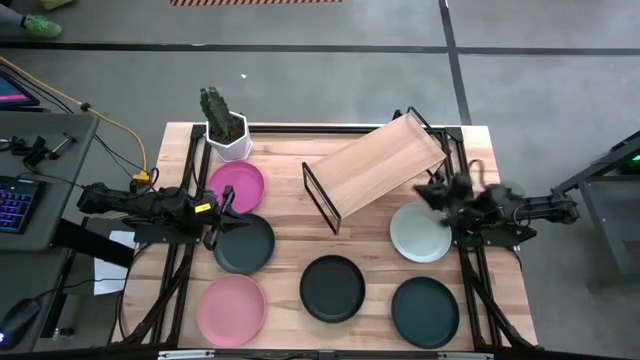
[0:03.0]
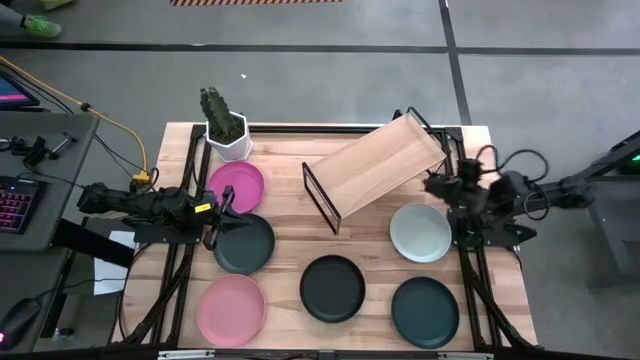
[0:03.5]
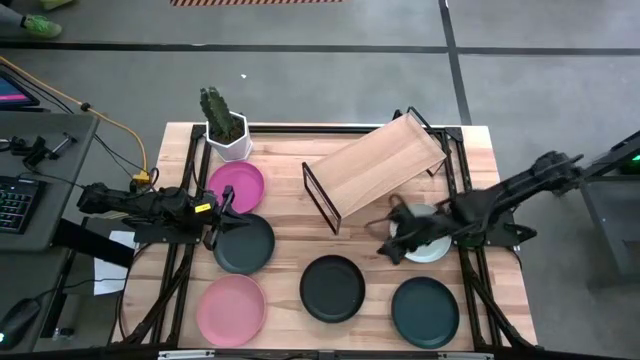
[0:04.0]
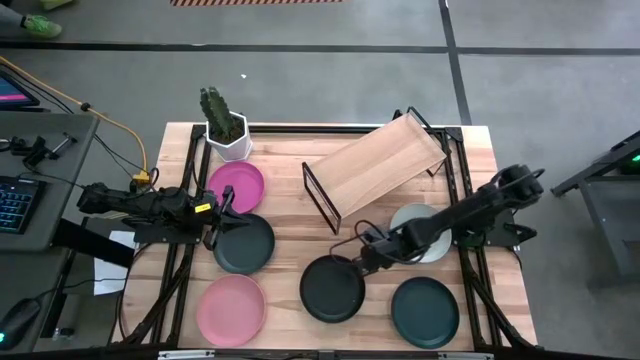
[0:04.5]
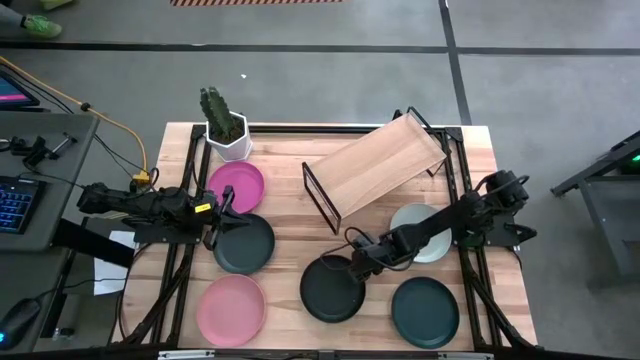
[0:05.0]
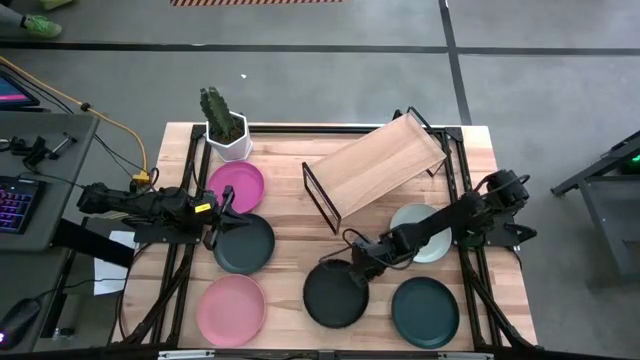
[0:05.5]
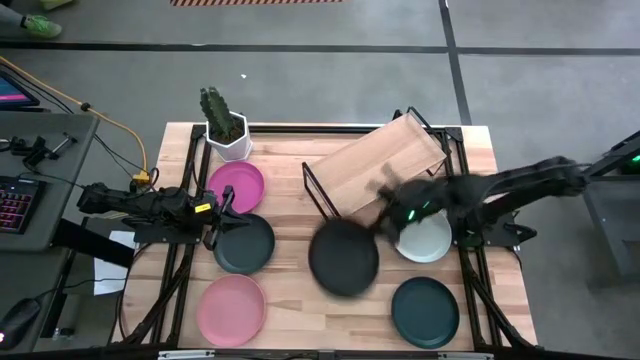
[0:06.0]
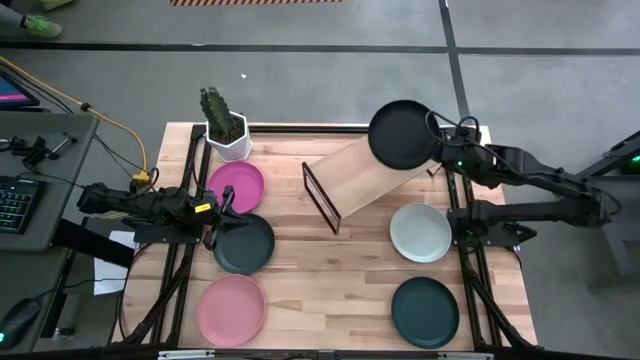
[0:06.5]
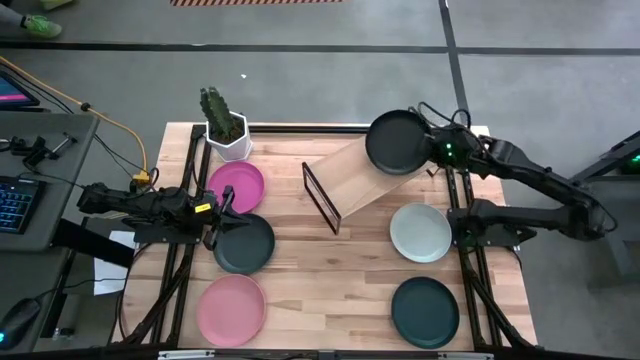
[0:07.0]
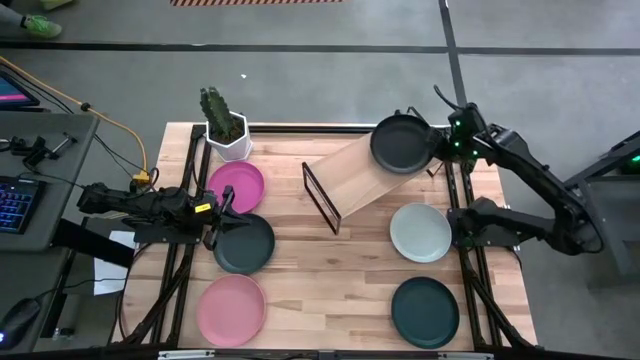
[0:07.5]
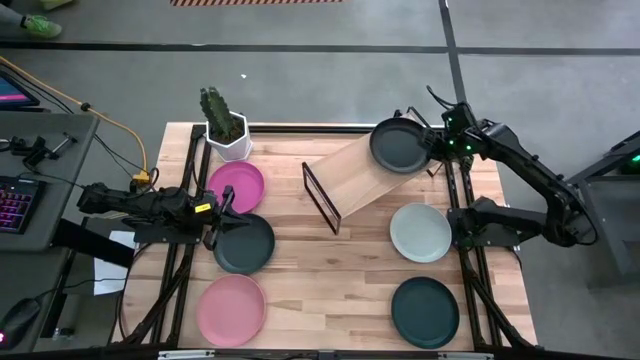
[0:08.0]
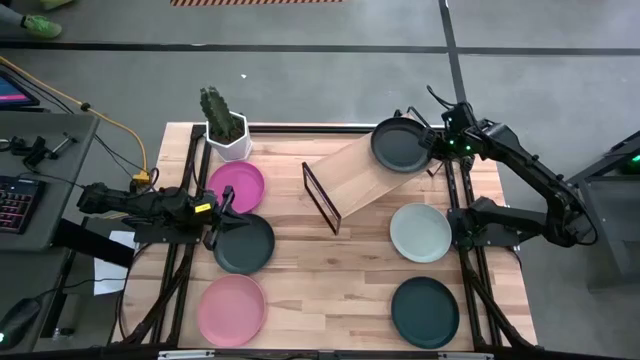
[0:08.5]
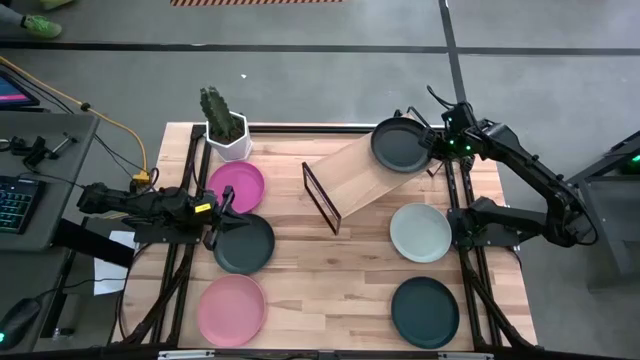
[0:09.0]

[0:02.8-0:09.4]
Task: Place and stack plates onto a shelf
Put the middle black plate on the shelf

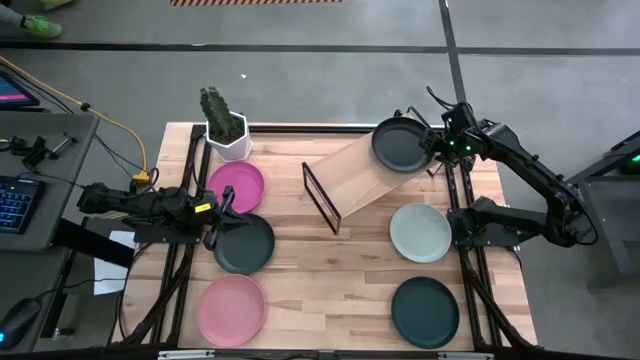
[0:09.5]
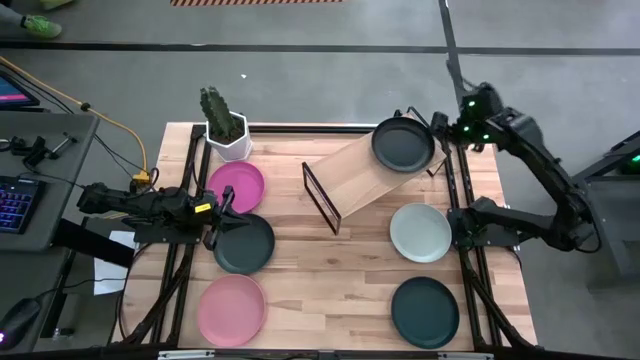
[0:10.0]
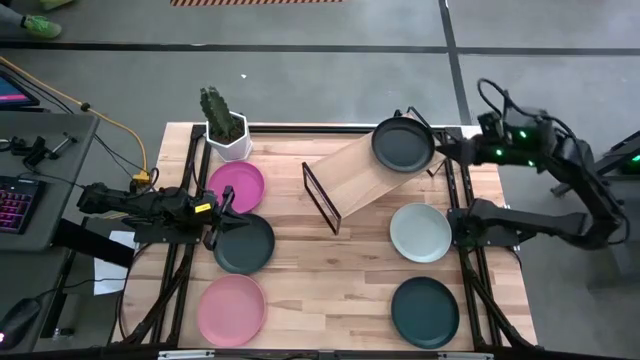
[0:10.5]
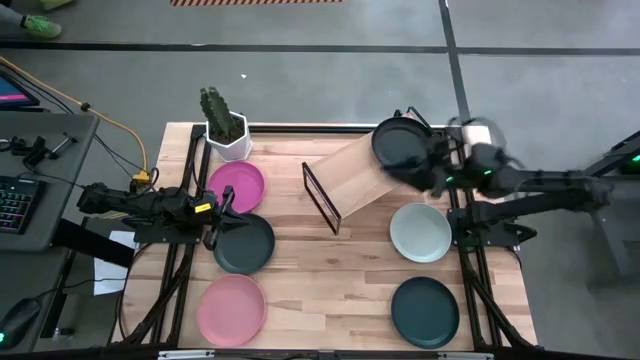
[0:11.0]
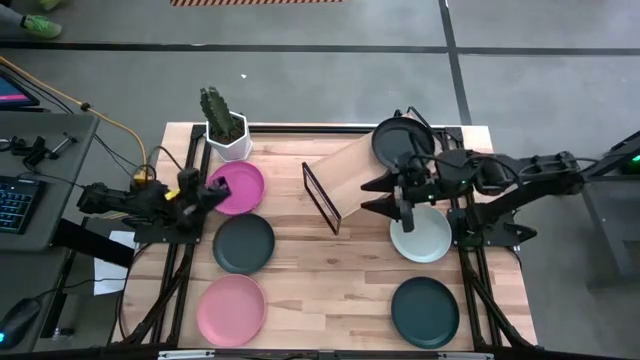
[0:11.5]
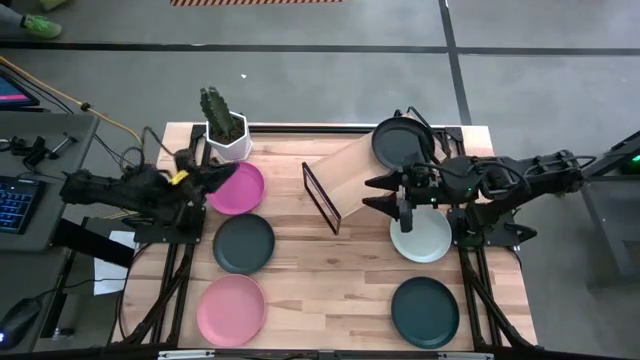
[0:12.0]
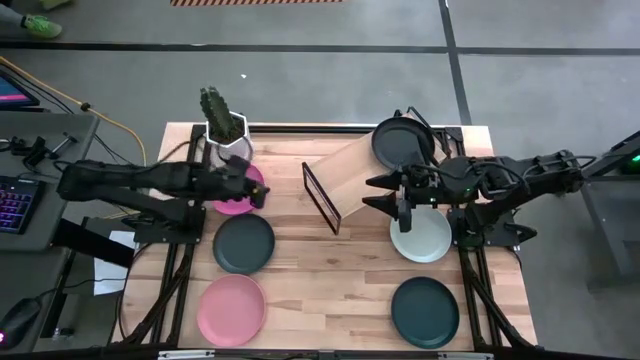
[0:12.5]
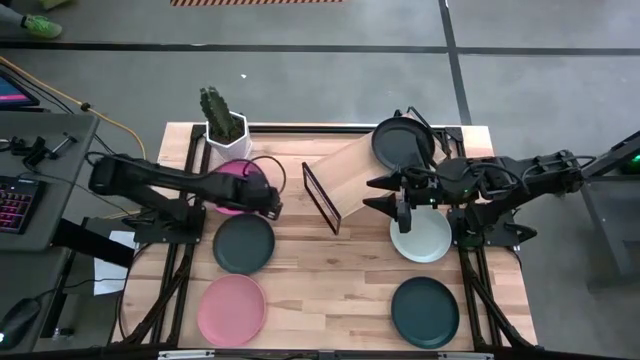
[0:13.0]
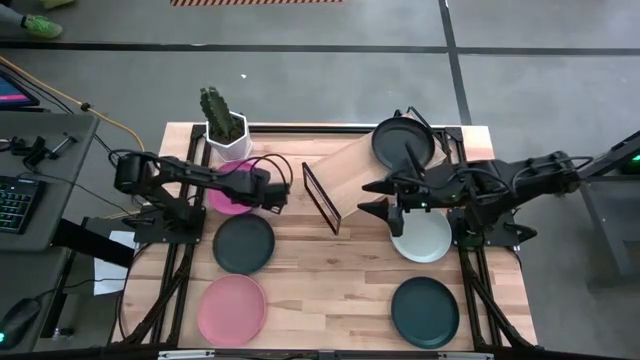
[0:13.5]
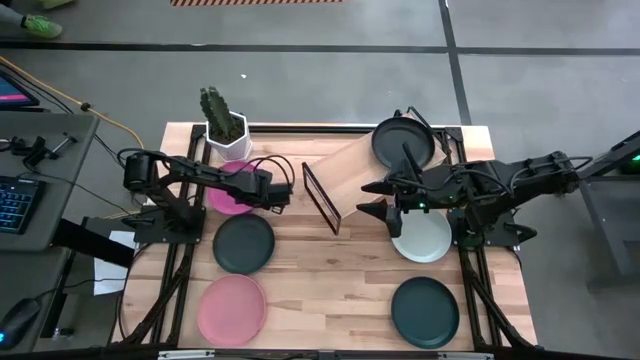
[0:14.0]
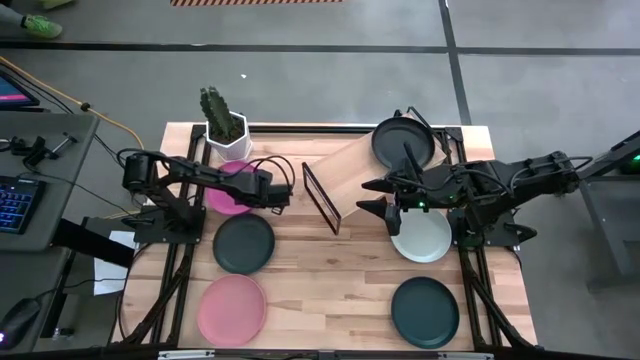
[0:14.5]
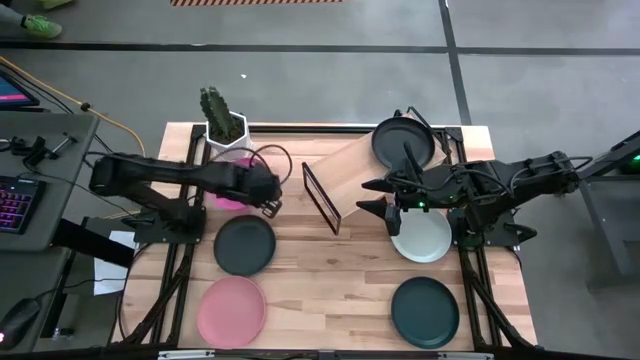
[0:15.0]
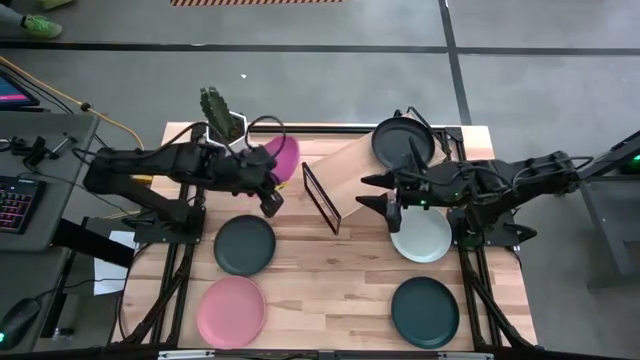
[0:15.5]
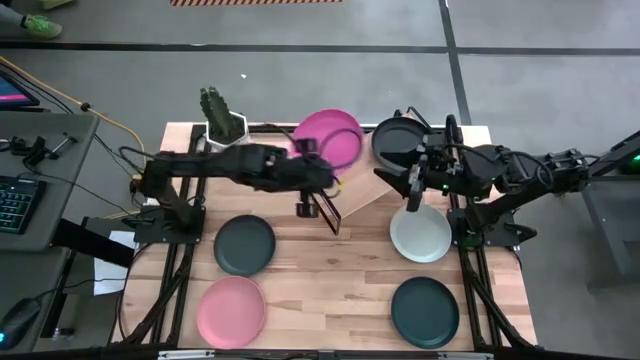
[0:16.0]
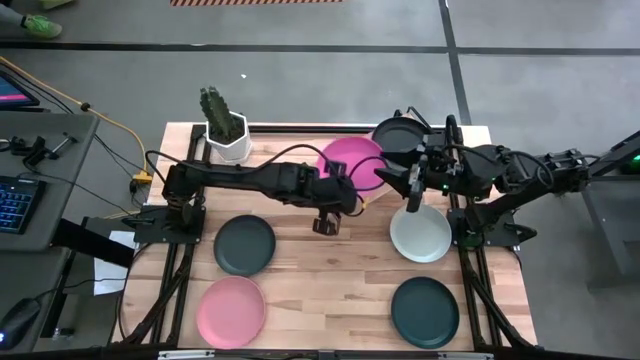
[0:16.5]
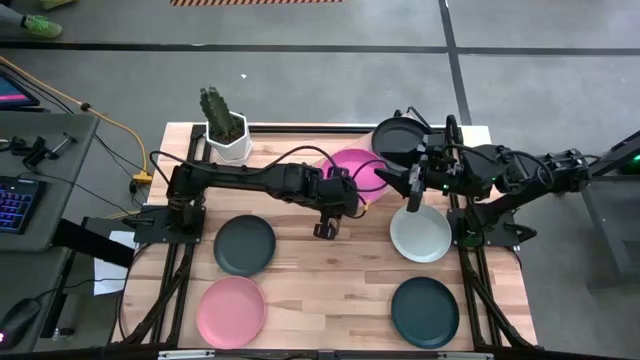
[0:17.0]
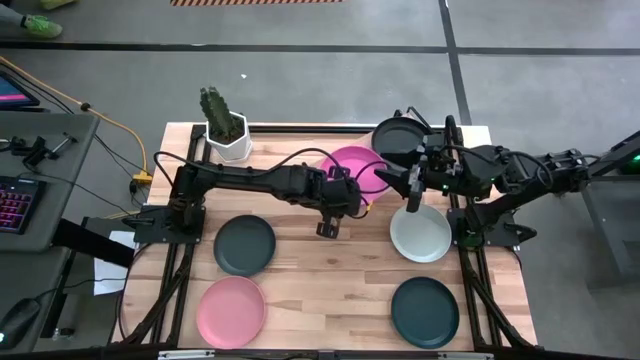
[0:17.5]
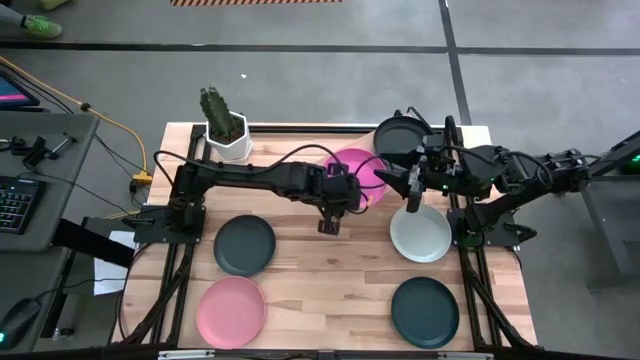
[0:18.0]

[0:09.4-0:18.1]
Put the top pink plate on the shelf

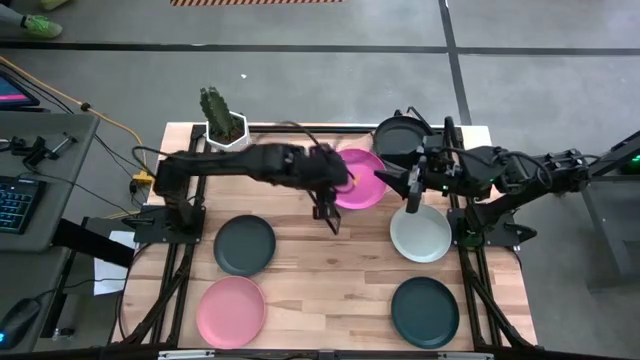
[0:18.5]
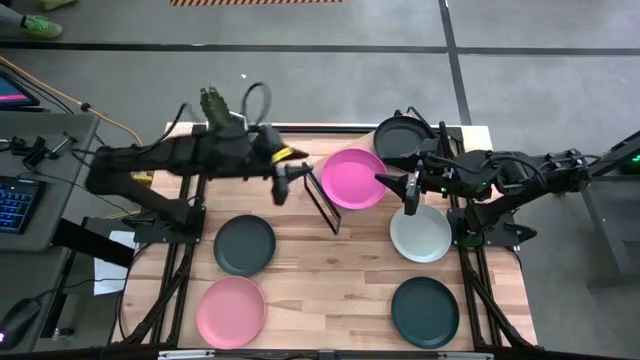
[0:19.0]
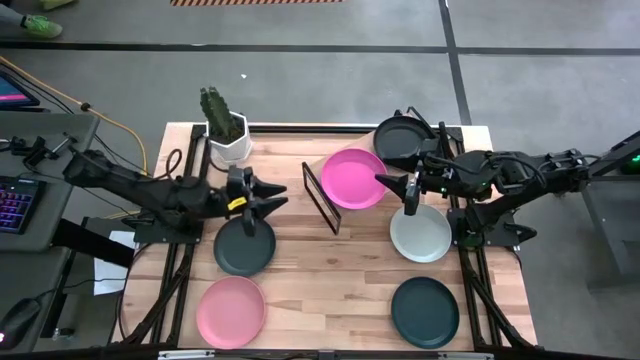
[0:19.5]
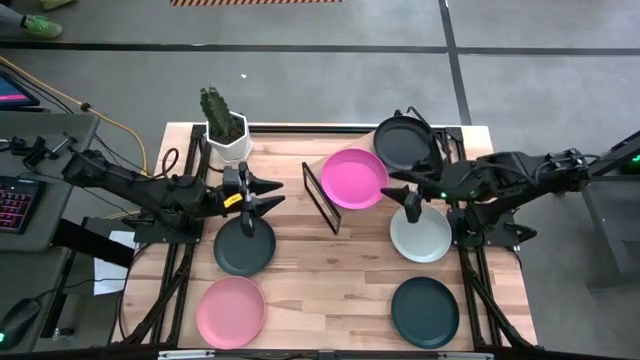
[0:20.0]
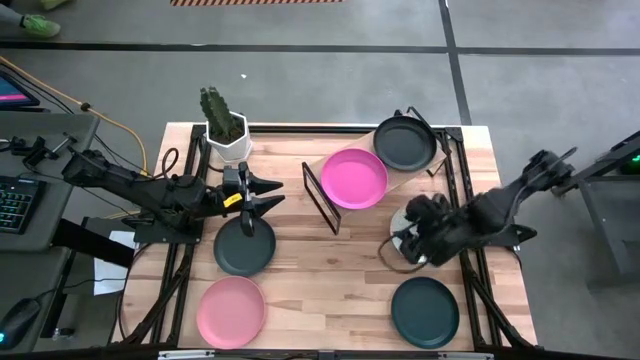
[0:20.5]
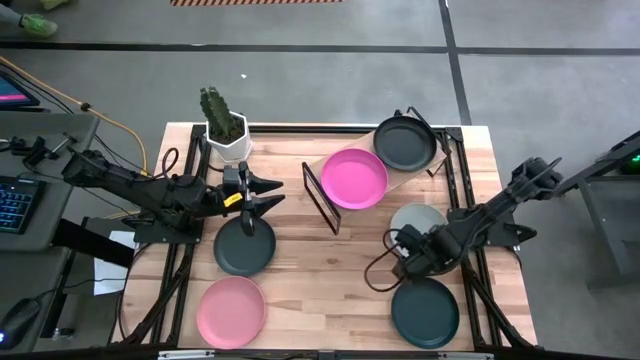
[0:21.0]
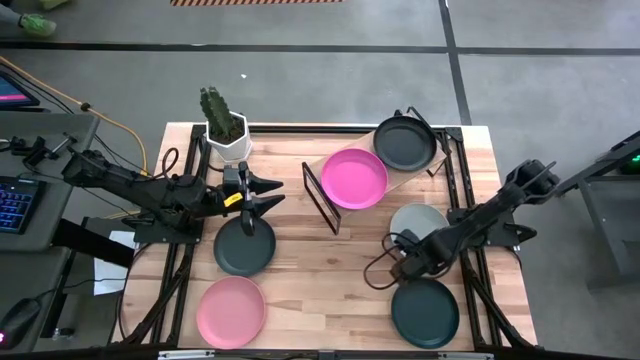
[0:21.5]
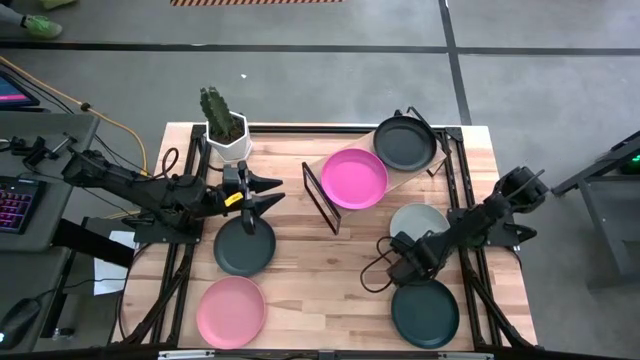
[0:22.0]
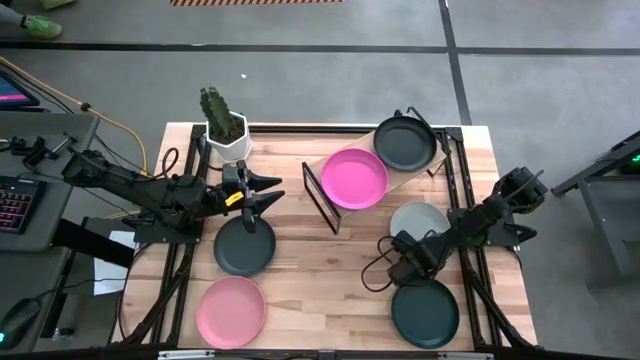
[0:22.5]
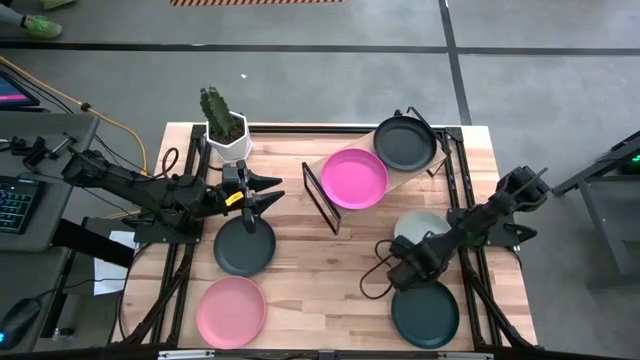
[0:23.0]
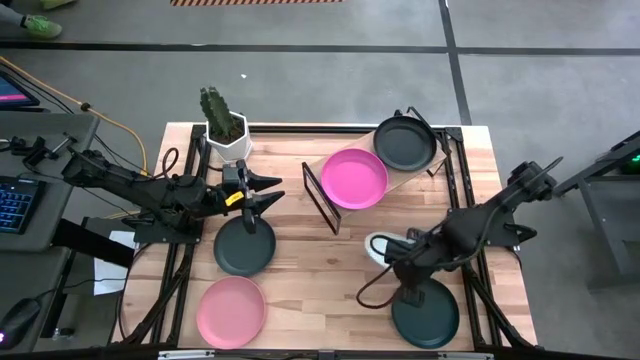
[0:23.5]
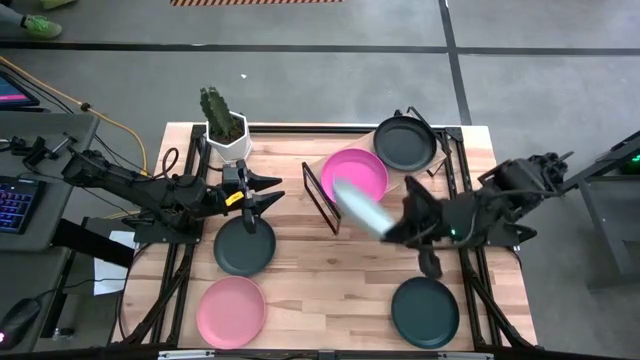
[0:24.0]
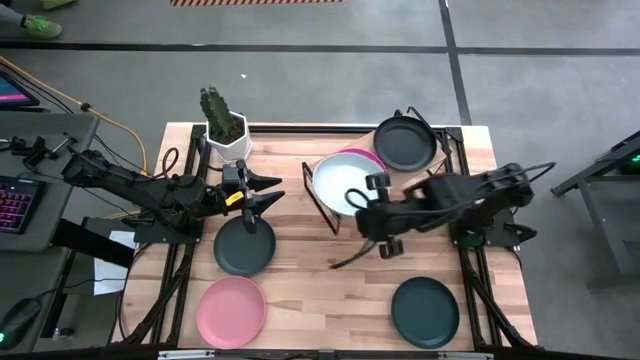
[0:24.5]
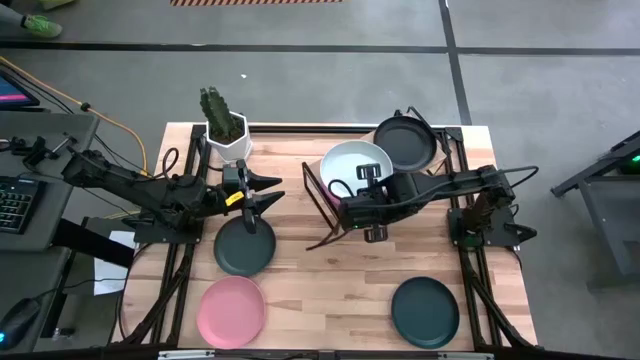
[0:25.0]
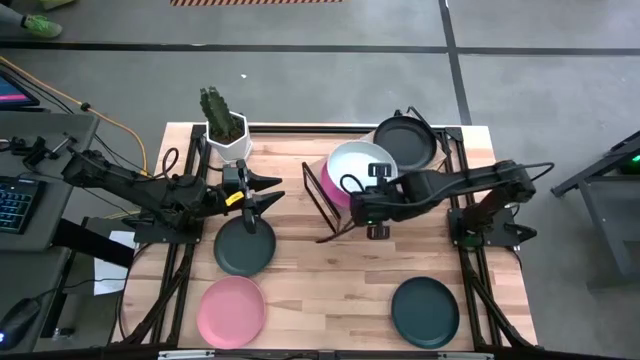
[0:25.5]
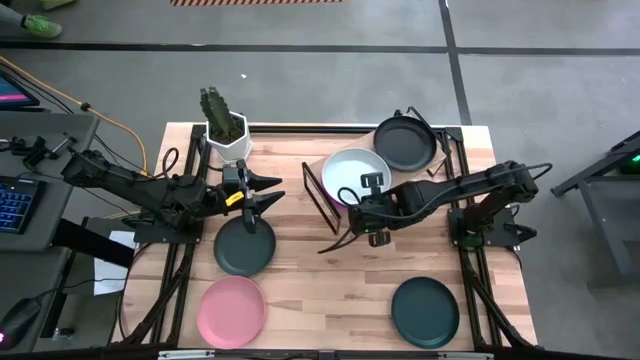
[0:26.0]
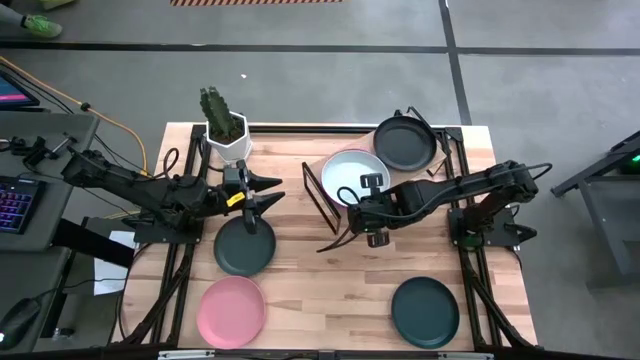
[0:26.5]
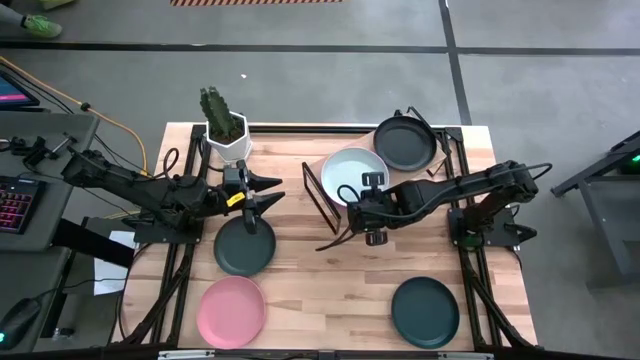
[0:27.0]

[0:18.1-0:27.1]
Stack the gray plate on top of the pink plate on the shelf
